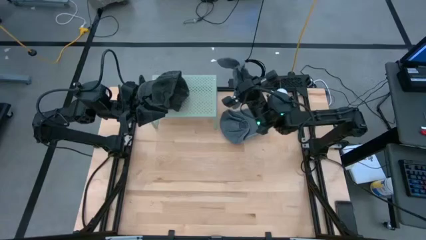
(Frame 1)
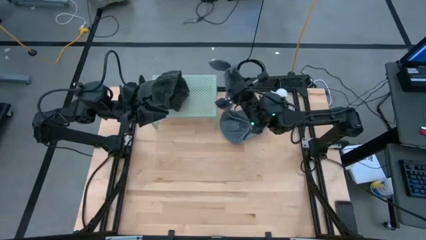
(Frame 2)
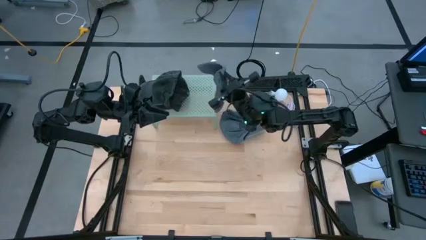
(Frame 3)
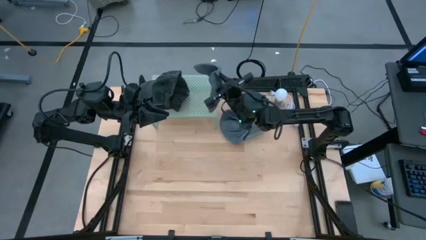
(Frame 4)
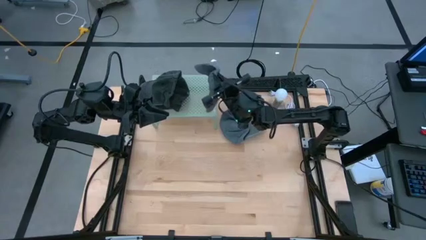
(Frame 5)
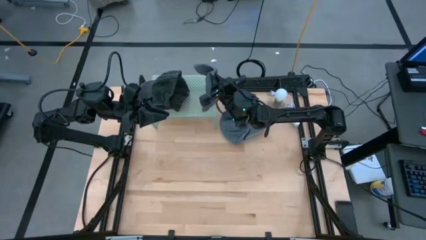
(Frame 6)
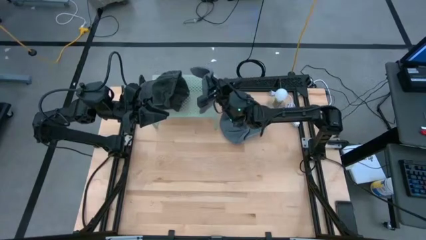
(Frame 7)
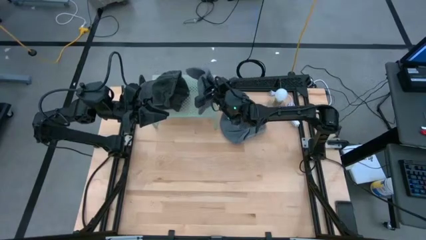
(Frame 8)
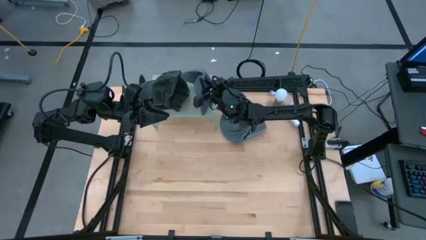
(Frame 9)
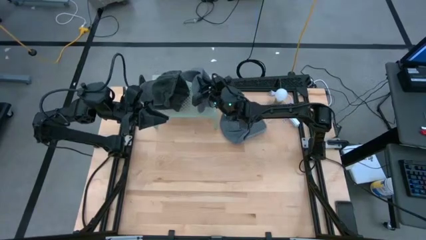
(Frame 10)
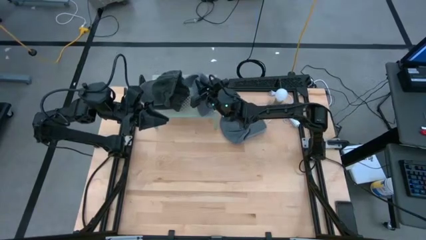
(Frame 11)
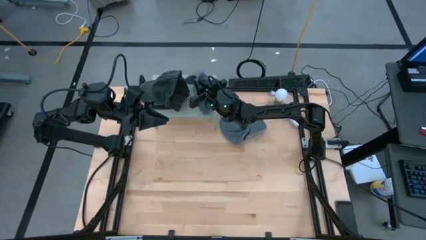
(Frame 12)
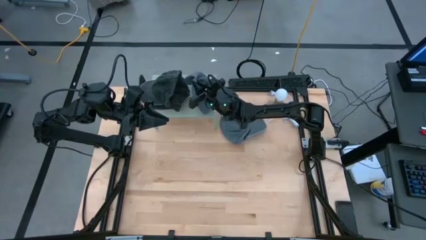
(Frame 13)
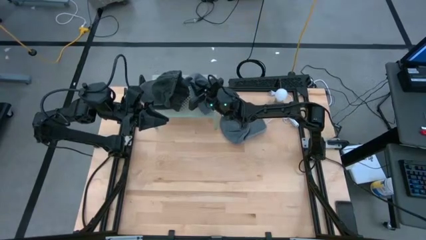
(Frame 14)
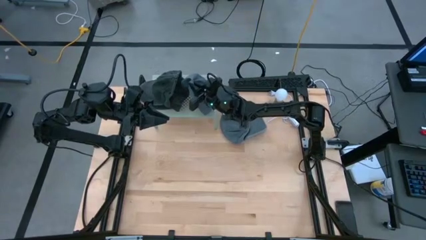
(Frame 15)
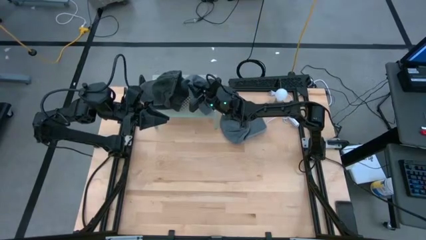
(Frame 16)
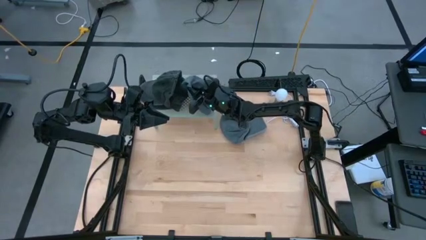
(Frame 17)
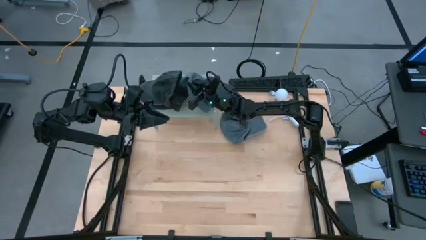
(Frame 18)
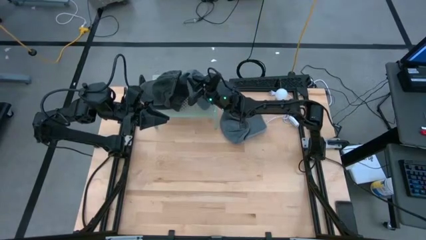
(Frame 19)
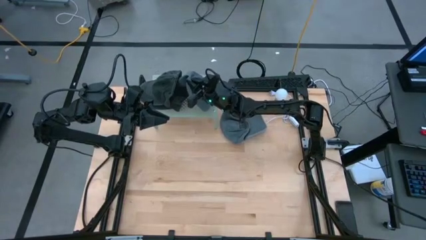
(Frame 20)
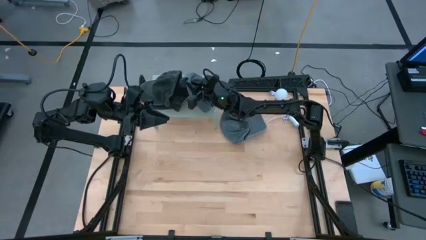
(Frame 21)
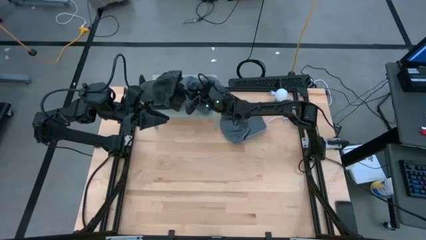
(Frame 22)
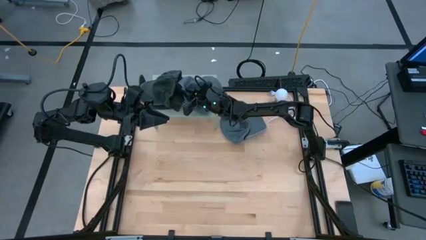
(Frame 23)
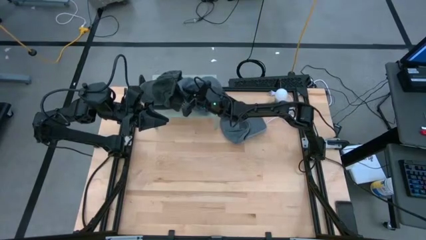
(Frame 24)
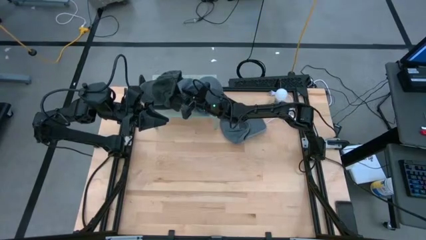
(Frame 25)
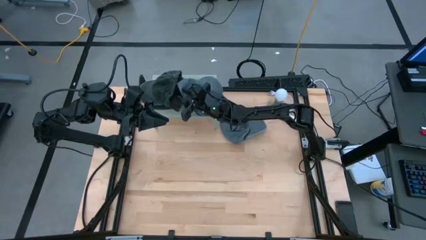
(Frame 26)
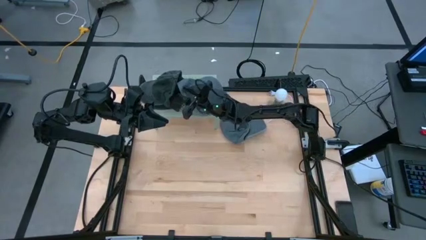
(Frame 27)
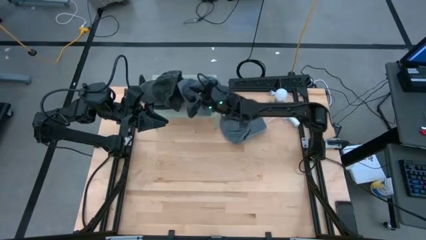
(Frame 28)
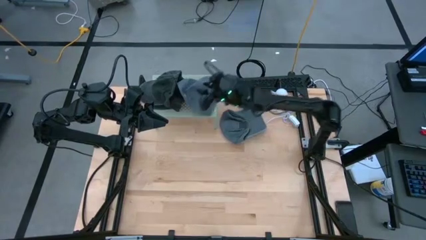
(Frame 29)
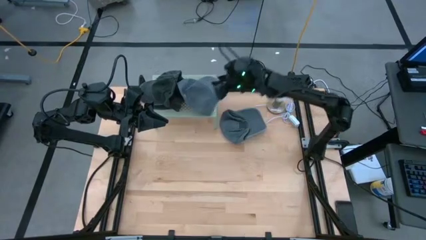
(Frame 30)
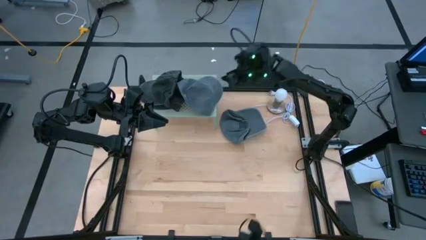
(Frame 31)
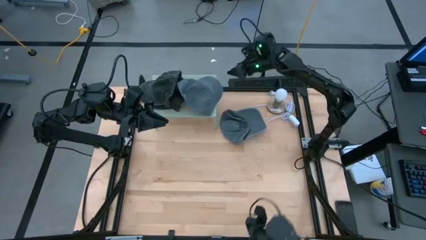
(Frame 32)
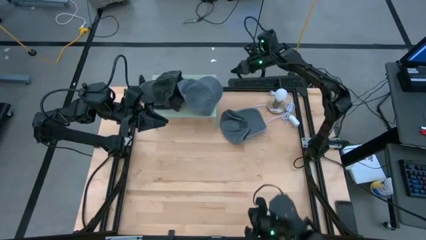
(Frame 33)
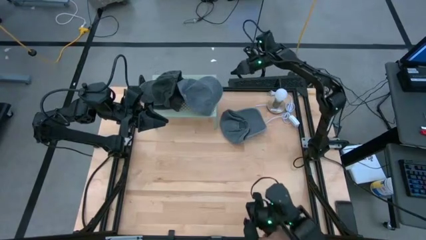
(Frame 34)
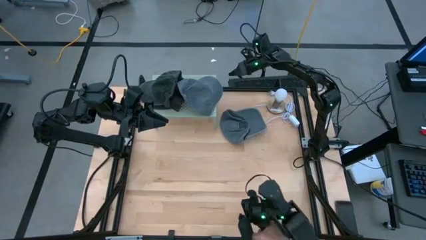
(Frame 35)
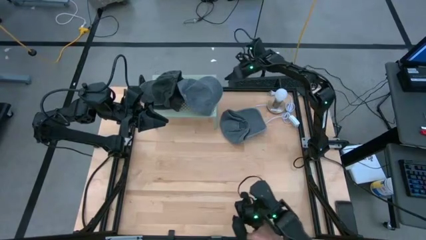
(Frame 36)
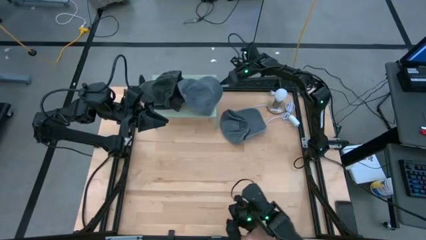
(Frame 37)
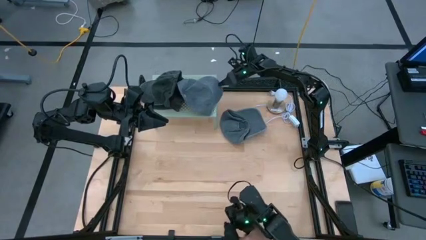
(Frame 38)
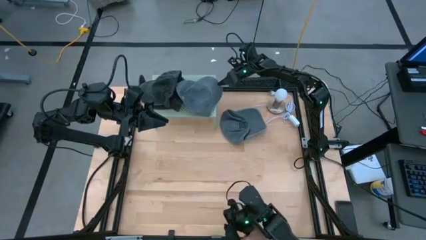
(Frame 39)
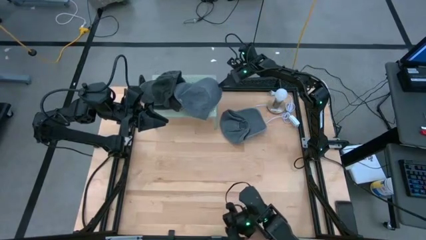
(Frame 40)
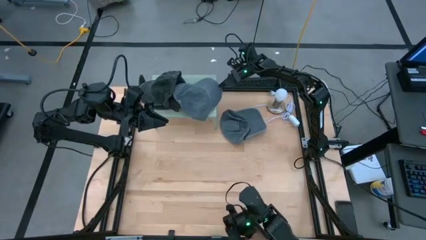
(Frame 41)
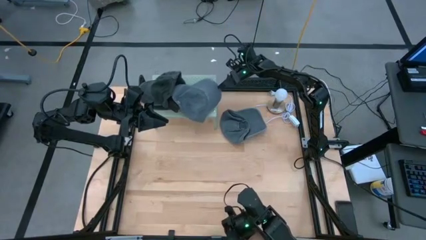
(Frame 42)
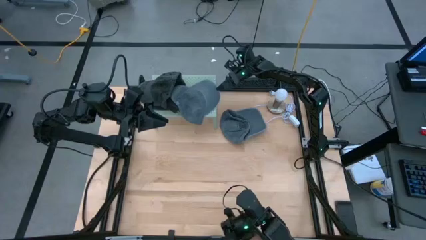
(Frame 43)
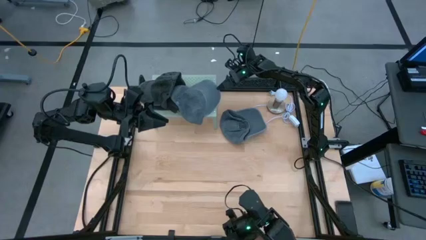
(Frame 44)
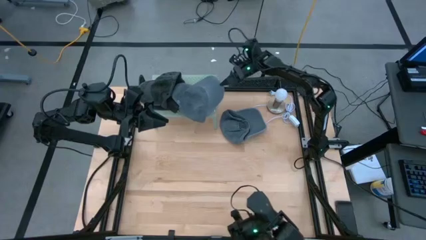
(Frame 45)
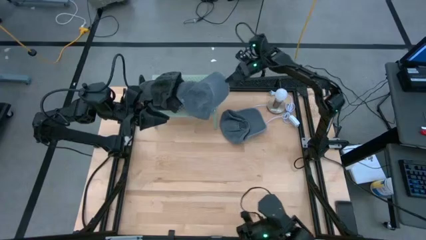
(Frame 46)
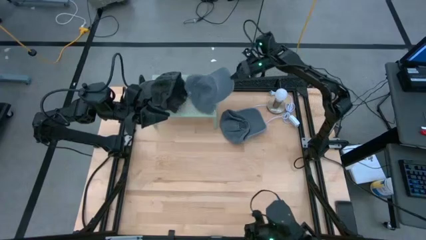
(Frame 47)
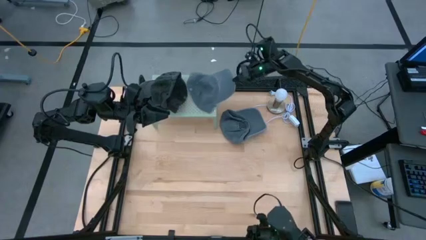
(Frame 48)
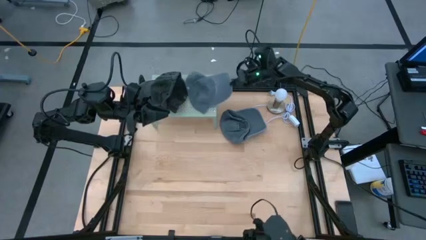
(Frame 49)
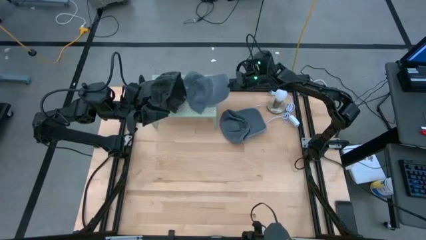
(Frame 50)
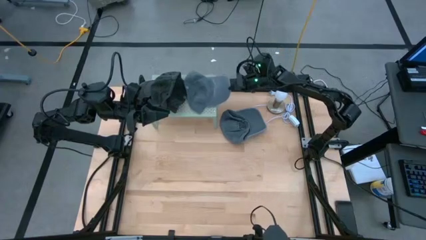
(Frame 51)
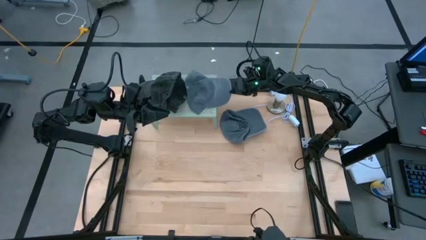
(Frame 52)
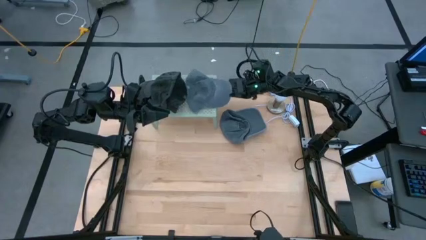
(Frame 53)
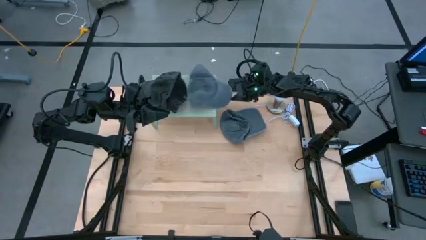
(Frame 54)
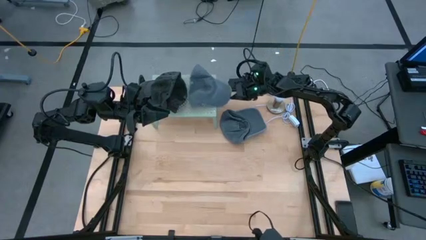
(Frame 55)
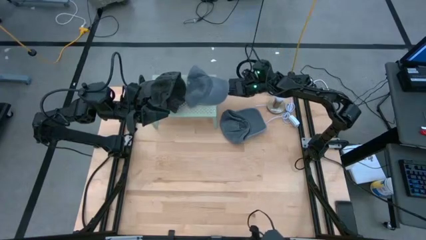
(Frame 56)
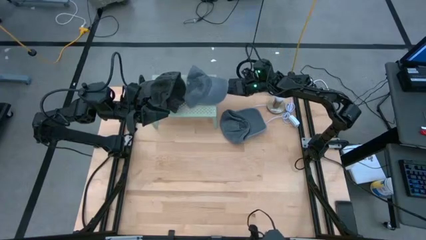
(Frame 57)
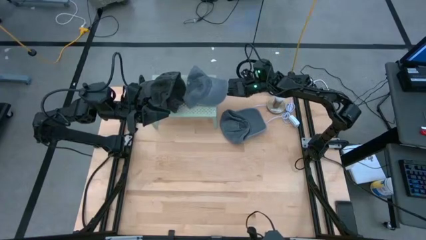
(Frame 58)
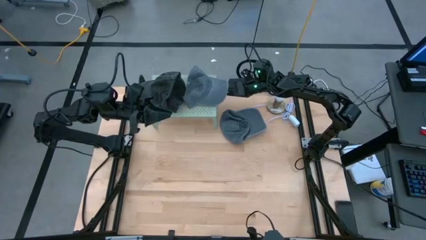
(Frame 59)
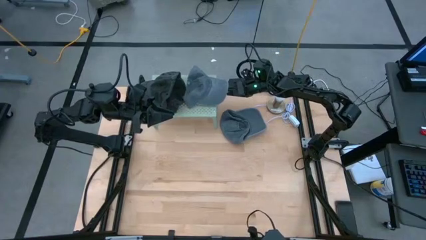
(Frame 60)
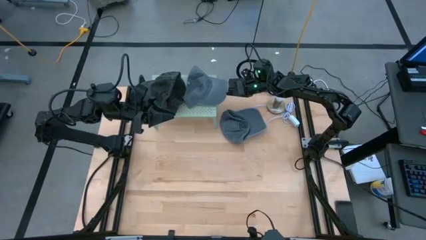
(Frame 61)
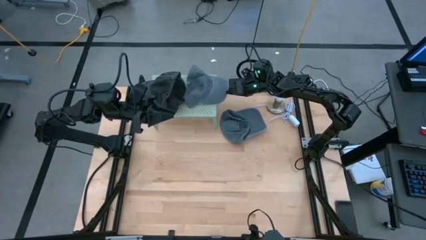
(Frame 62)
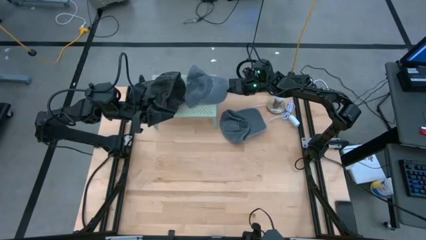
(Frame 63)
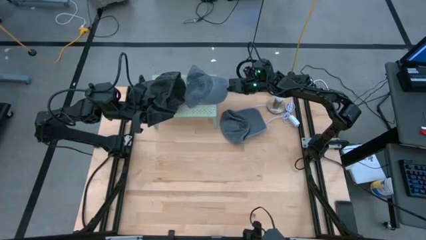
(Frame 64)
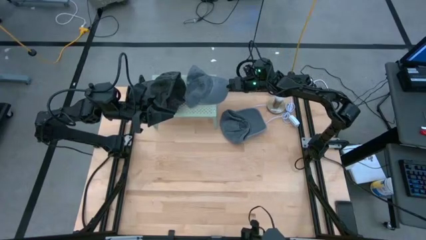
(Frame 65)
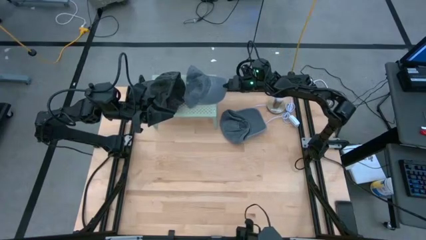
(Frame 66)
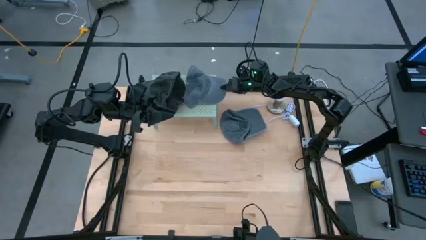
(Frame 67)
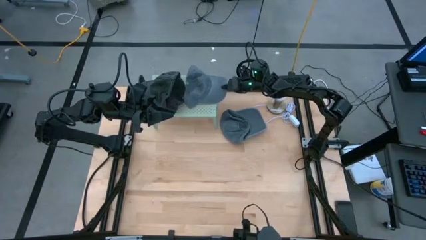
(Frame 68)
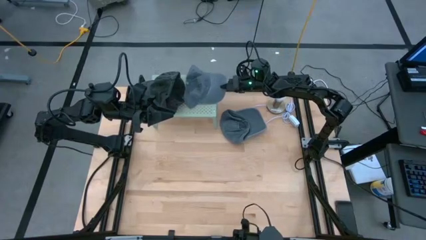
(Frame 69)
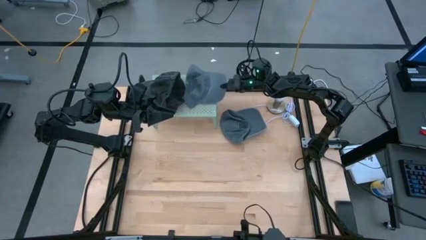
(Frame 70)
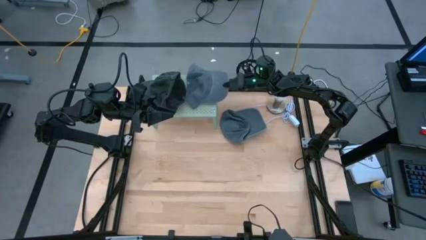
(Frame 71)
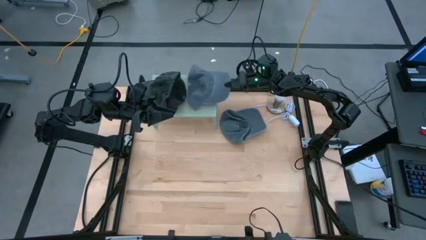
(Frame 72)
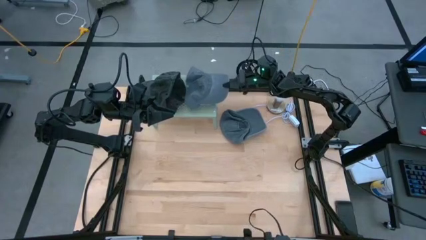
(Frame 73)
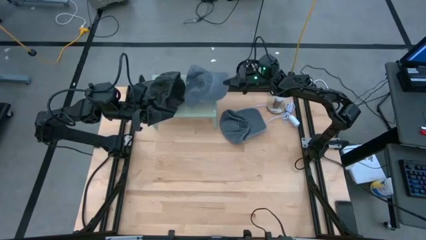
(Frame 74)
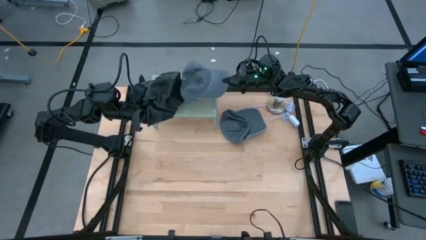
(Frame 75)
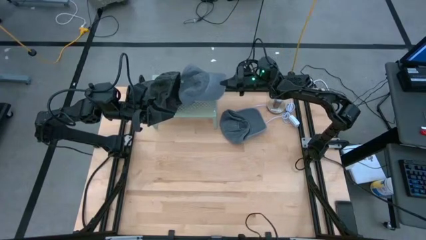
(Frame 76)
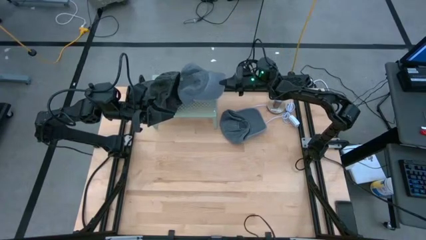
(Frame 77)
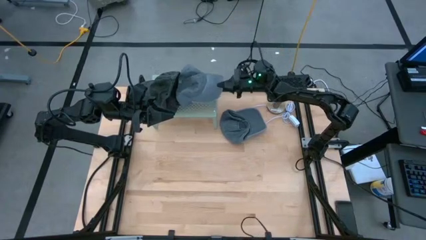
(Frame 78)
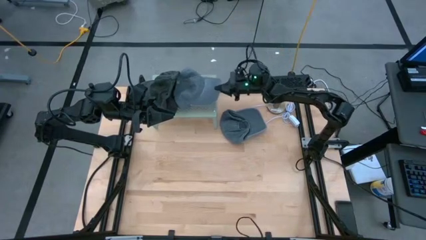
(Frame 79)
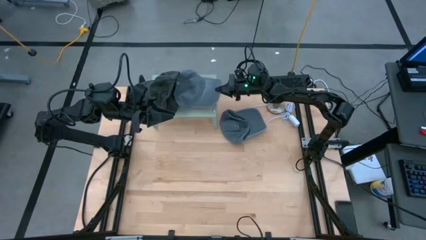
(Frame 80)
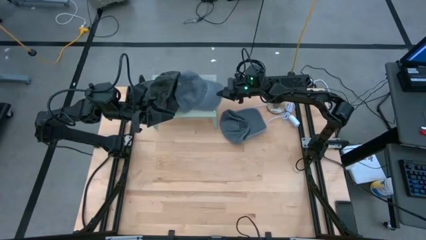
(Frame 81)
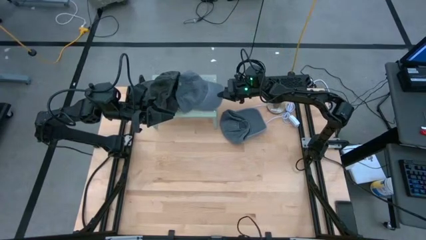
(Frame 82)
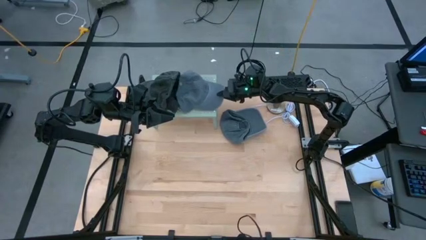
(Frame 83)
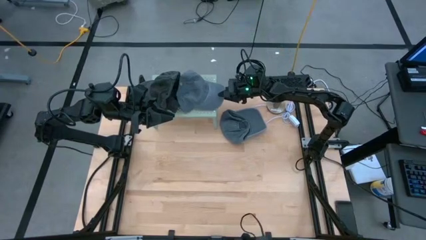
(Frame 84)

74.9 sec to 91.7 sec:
Task: Pick & Place hat
Put the gray cap on the shelf
